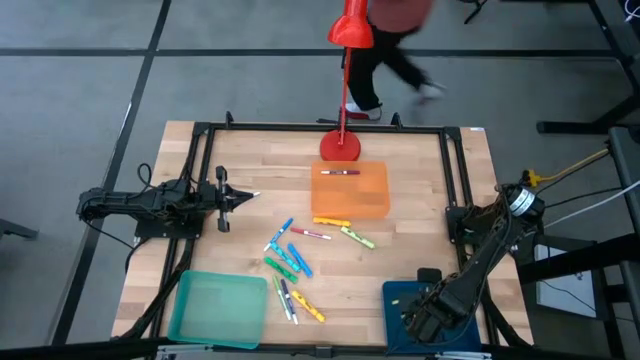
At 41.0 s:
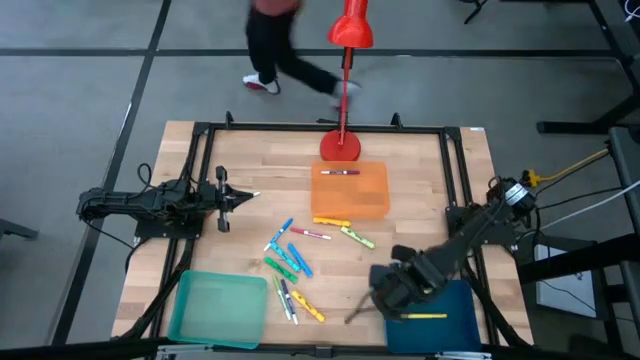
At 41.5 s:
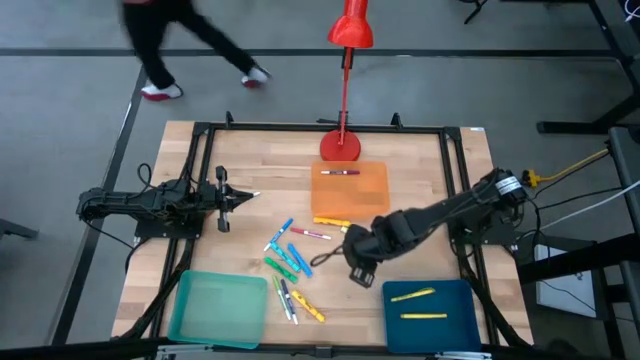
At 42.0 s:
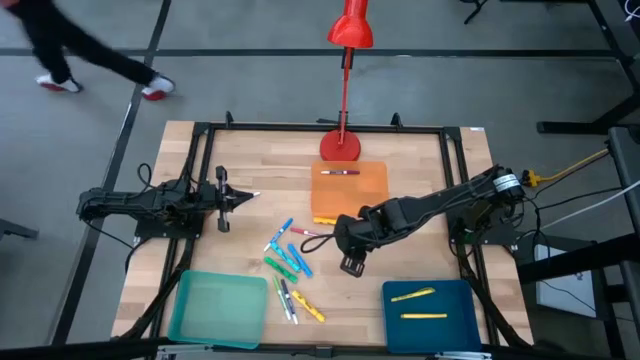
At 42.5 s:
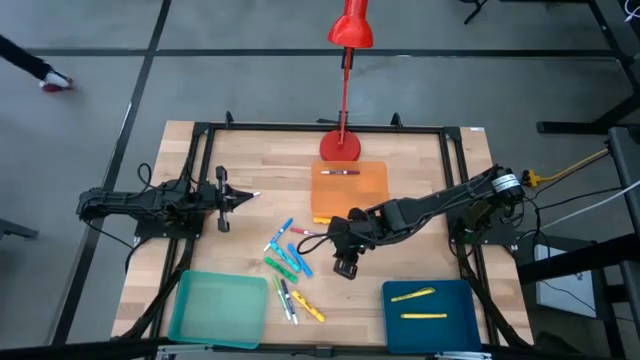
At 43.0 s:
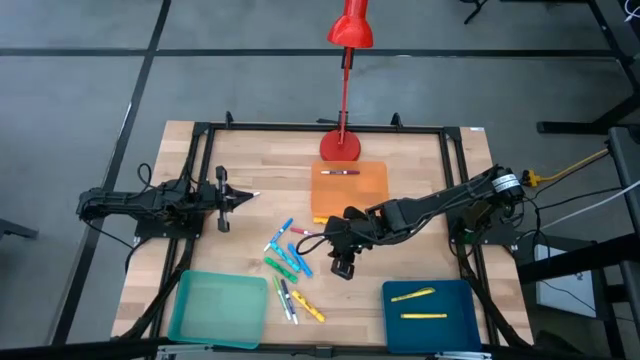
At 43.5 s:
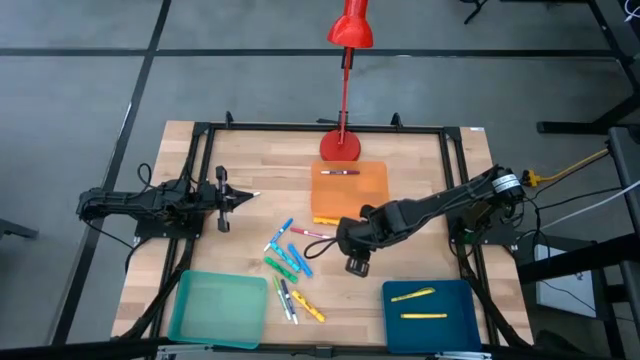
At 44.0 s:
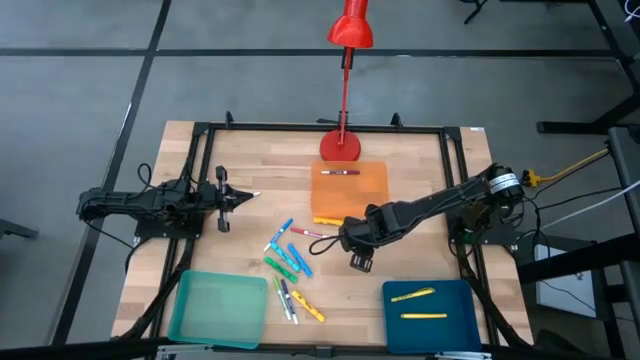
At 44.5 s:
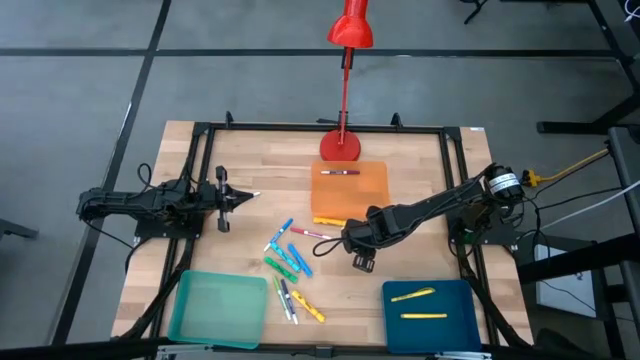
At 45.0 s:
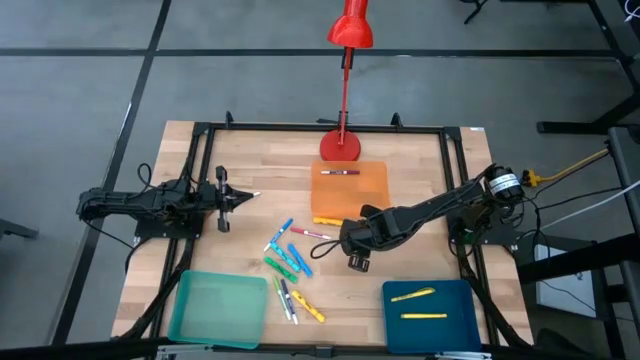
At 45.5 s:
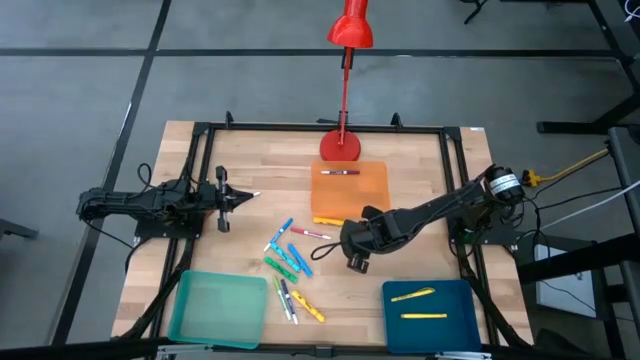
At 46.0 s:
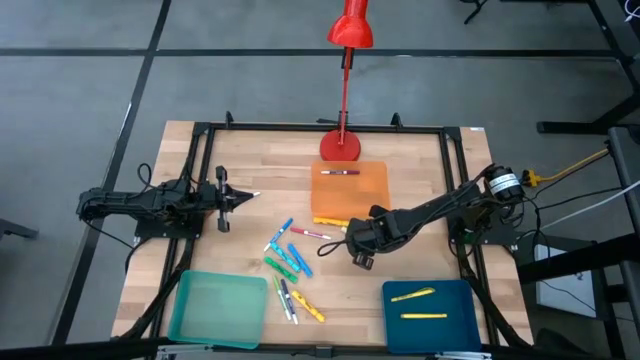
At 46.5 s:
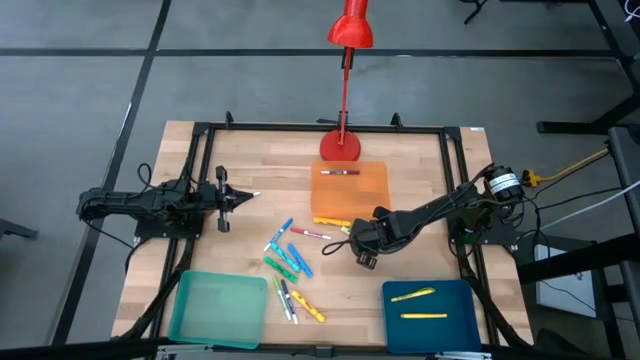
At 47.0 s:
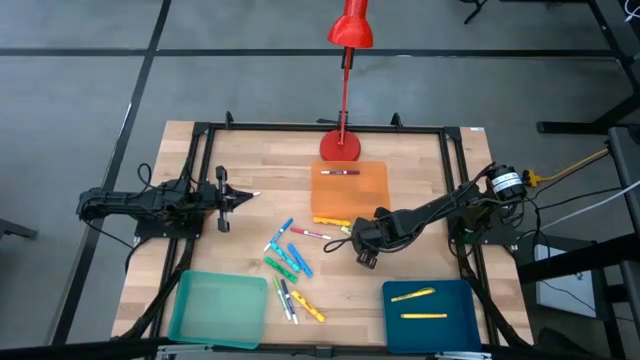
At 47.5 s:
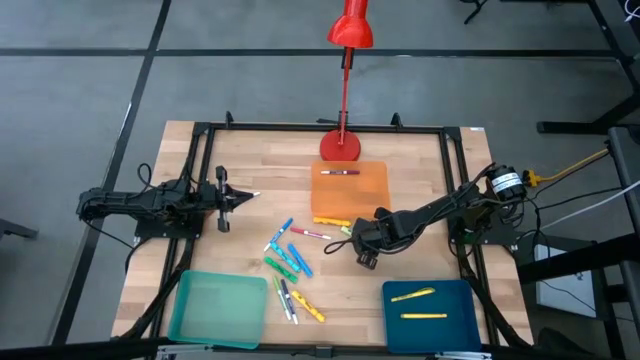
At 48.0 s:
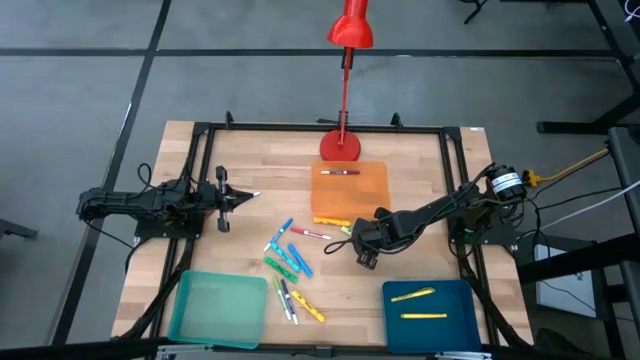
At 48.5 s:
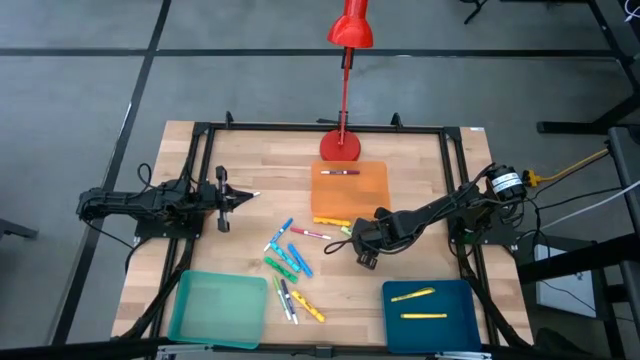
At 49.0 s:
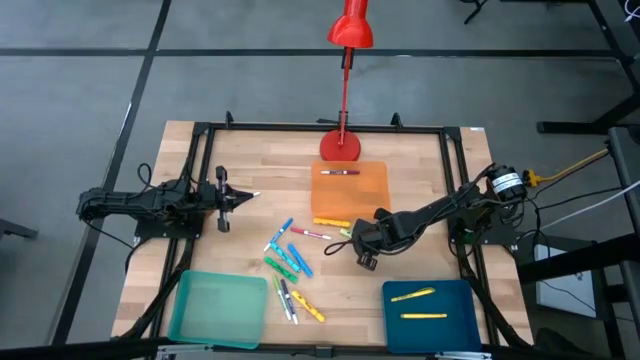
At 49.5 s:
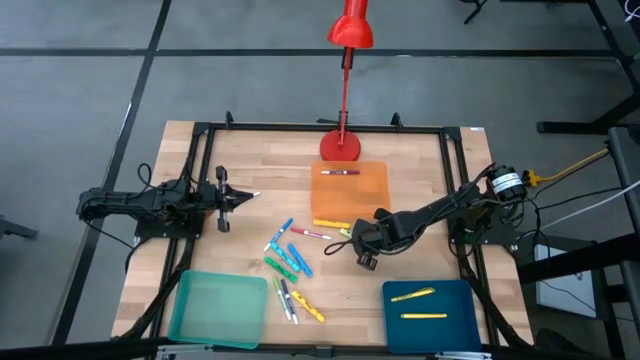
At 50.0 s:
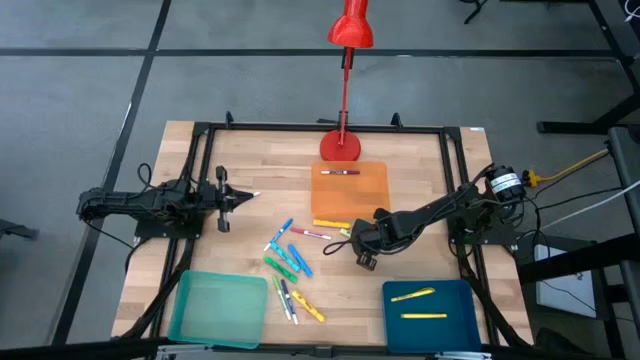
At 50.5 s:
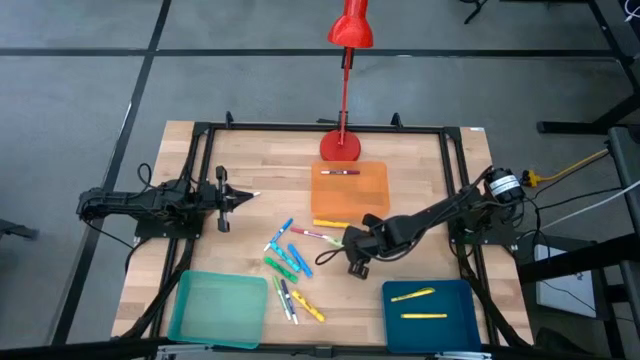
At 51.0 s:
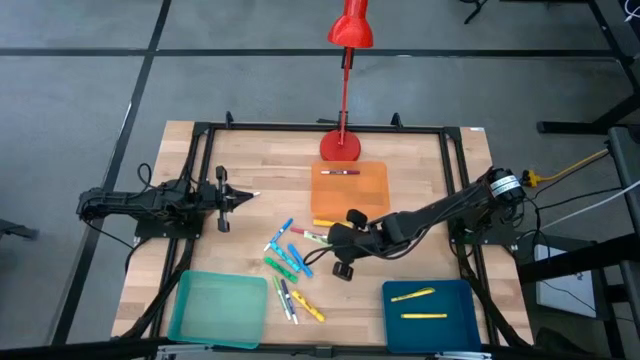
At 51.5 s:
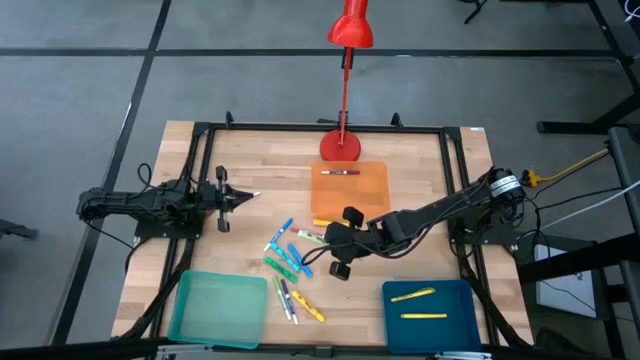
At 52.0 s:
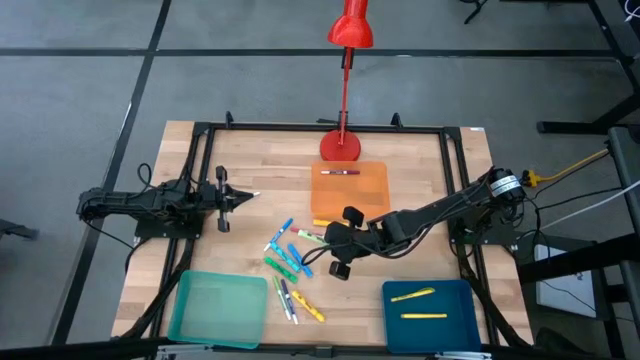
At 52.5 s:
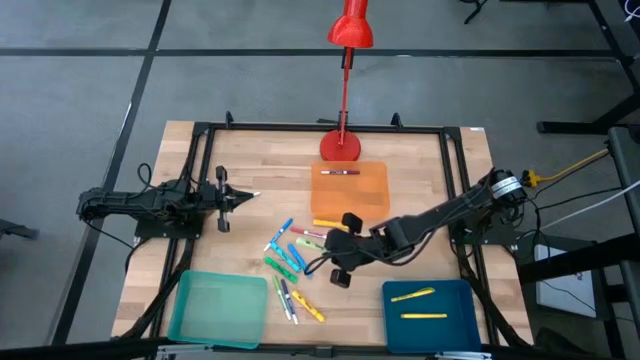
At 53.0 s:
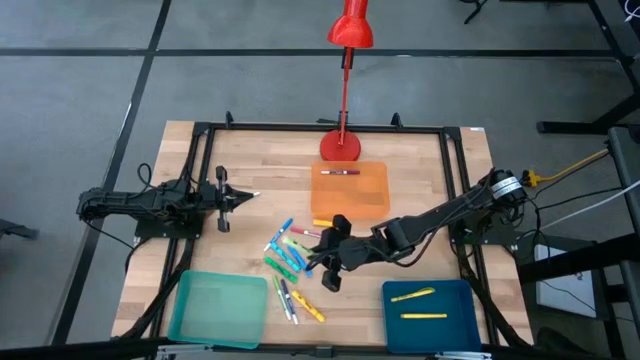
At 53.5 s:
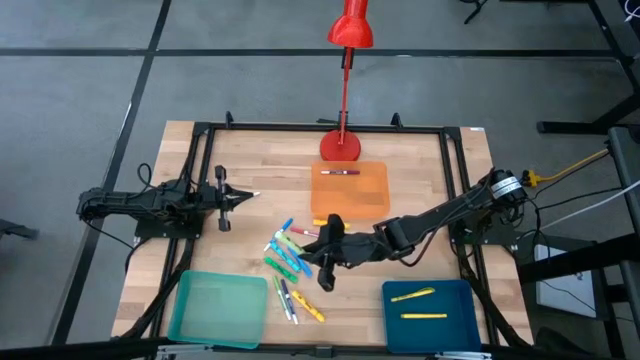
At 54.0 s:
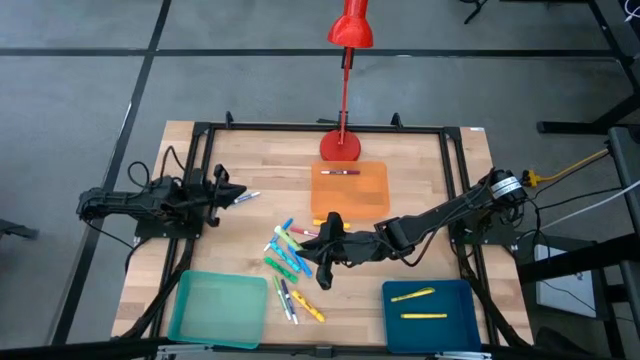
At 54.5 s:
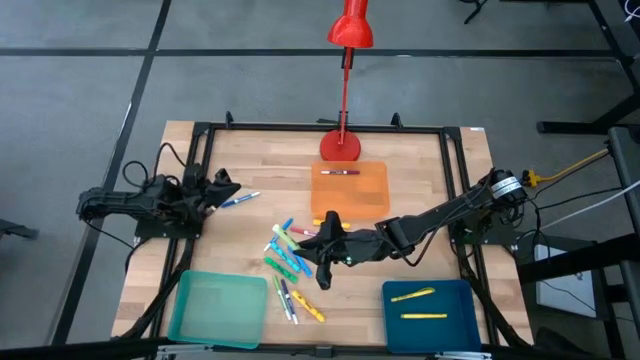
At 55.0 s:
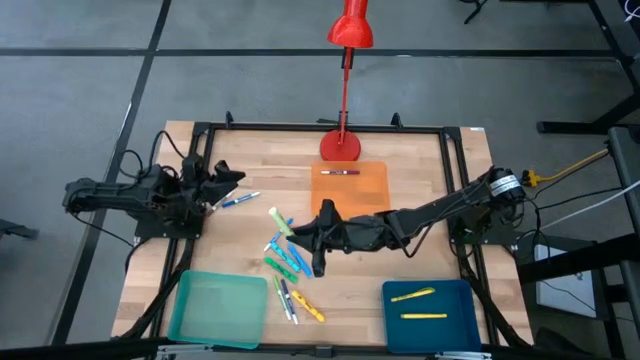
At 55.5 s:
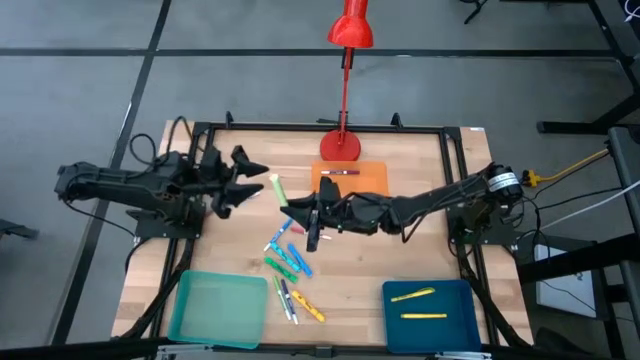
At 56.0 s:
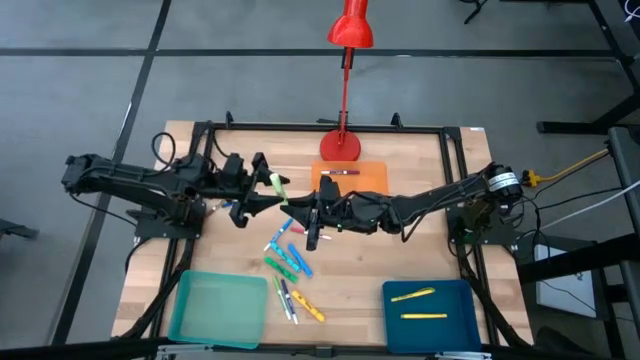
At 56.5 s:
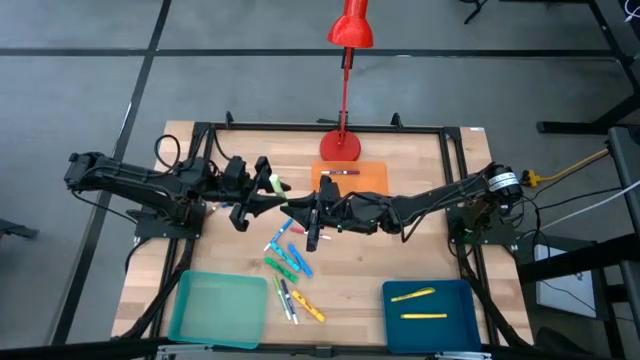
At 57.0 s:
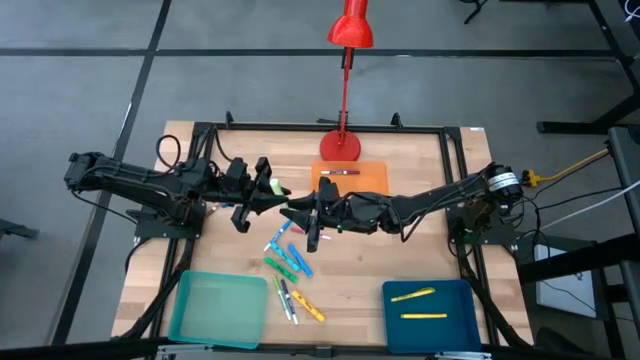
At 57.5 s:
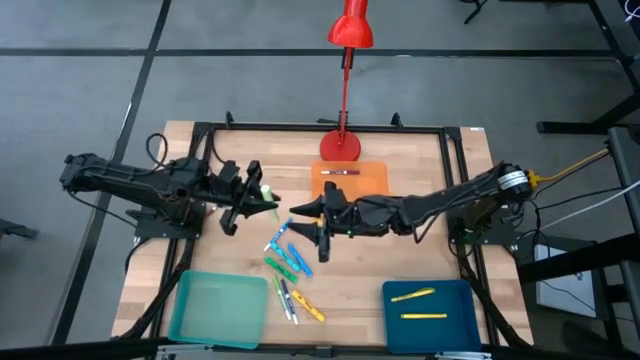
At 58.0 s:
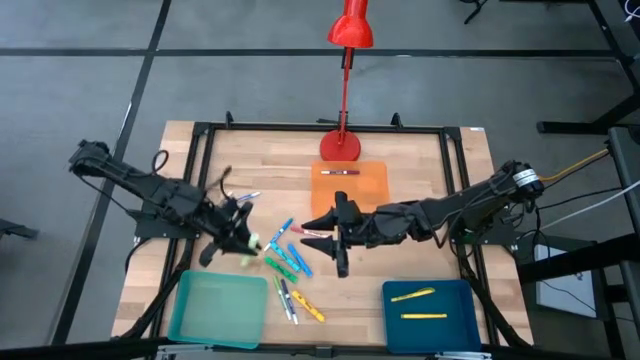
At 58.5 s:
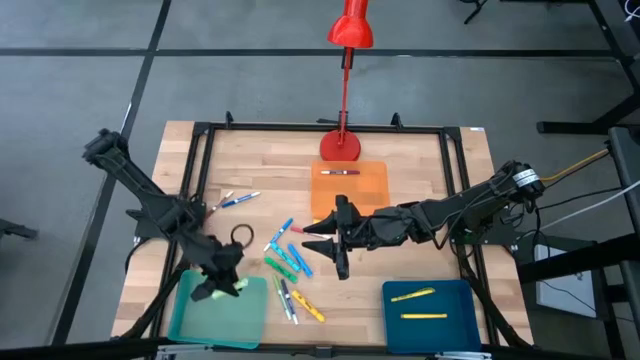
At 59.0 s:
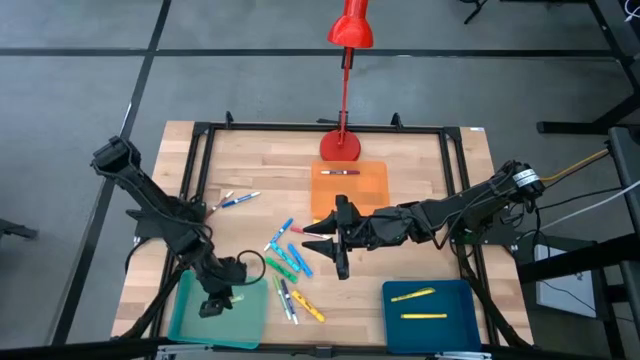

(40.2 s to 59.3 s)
Task: Pick & Place Markers
Put the green highlighter pen into the green bin

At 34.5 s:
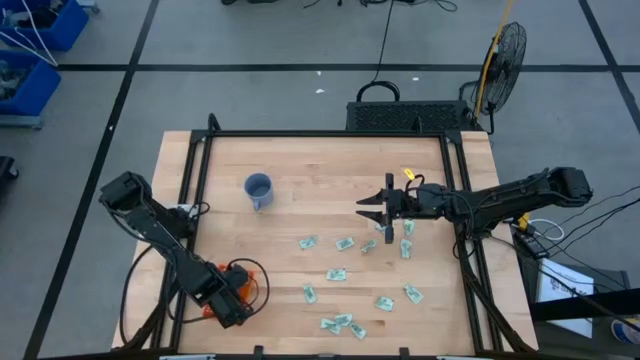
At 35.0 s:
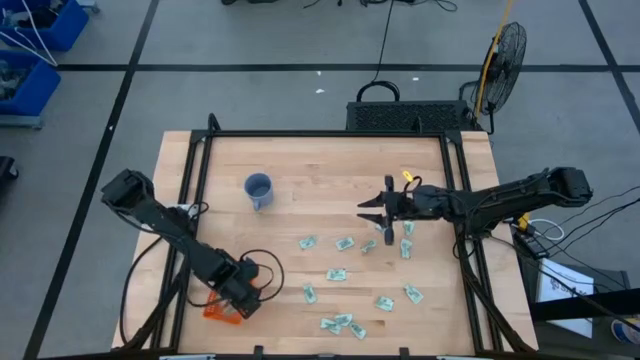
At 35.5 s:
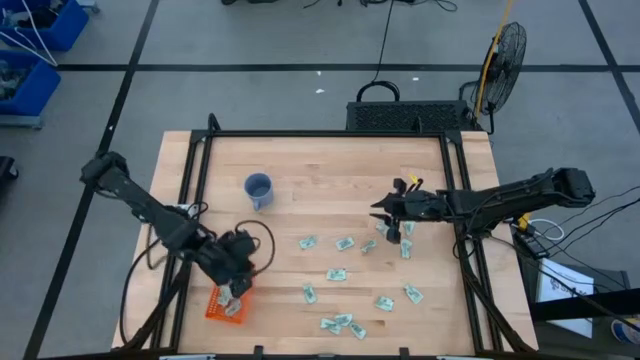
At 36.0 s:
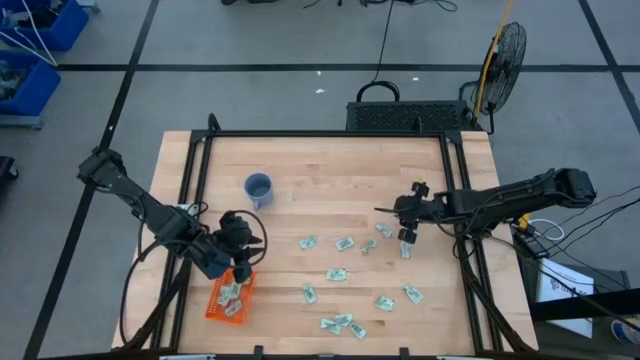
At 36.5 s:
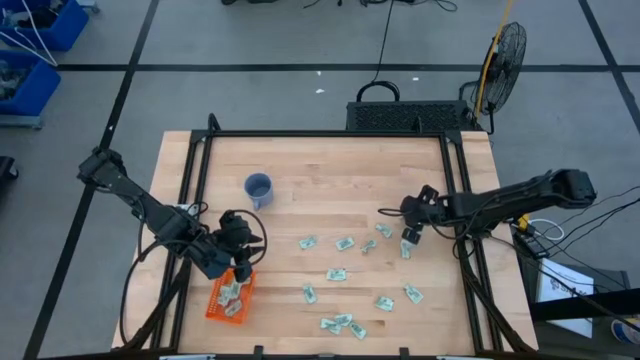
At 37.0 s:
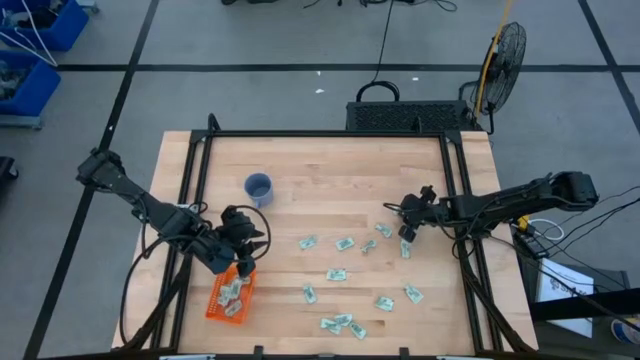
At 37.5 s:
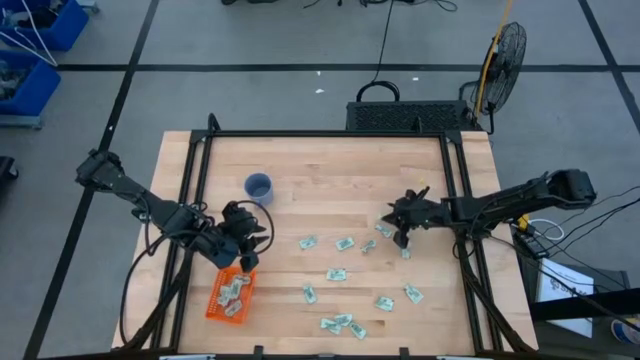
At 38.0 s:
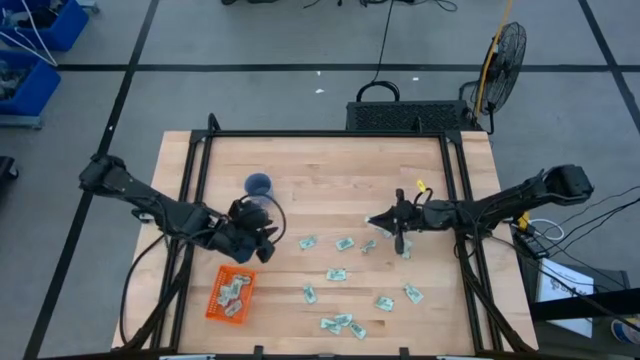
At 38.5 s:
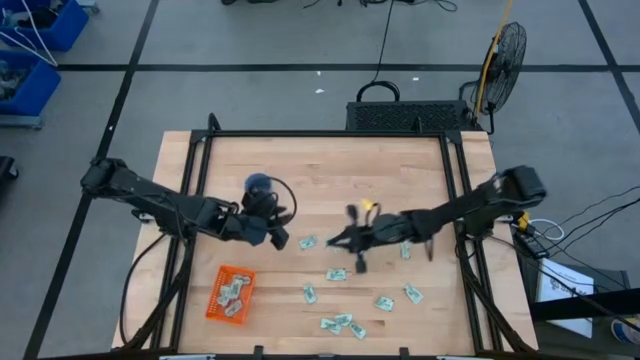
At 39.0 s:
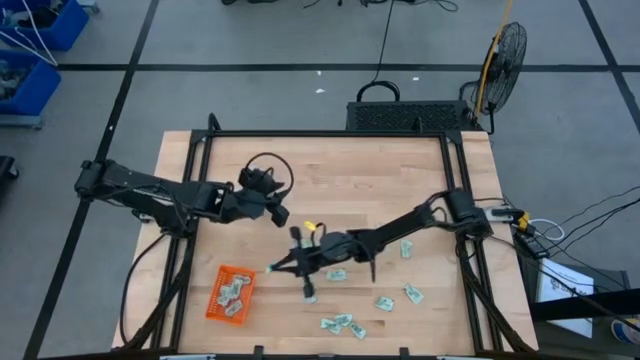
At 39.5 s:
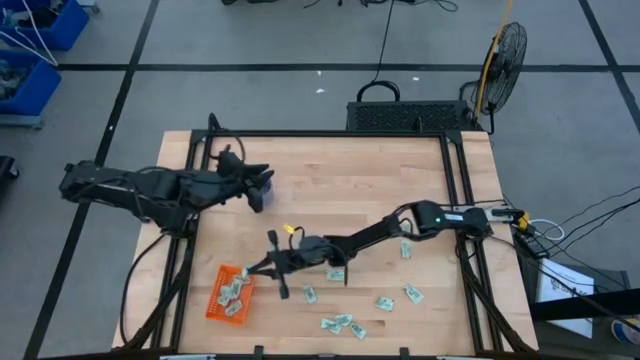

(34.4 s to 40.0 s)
Task: Pick and place Stevia / Truvia into bins
Put the stevia packet into the orange bin
